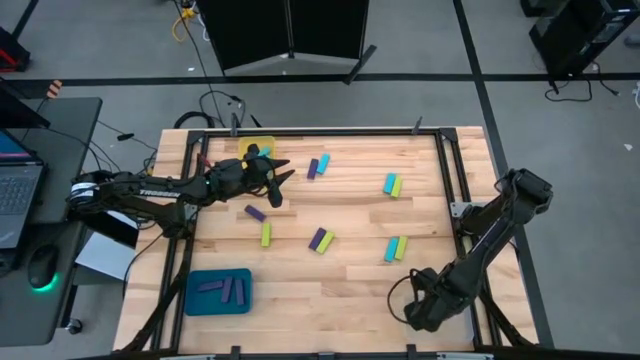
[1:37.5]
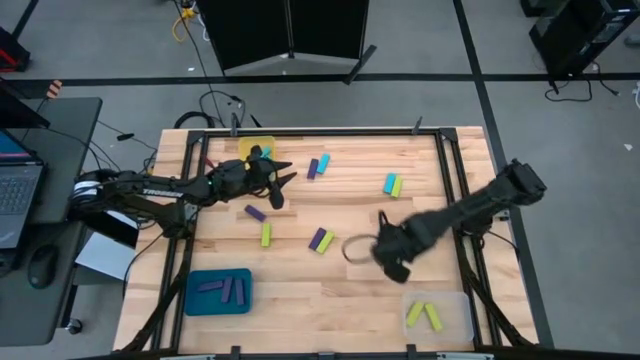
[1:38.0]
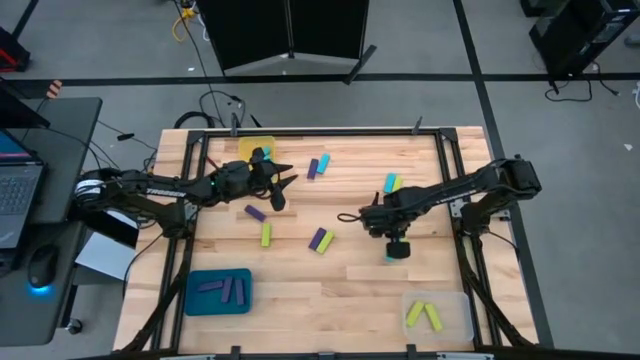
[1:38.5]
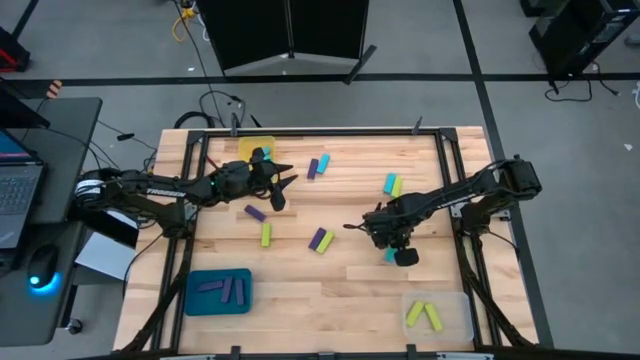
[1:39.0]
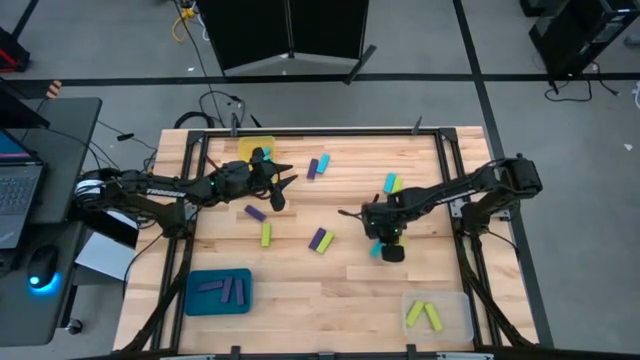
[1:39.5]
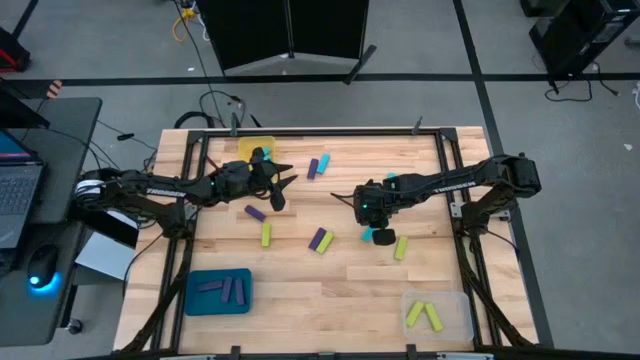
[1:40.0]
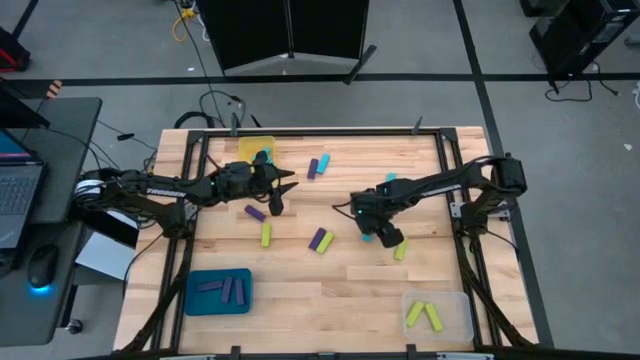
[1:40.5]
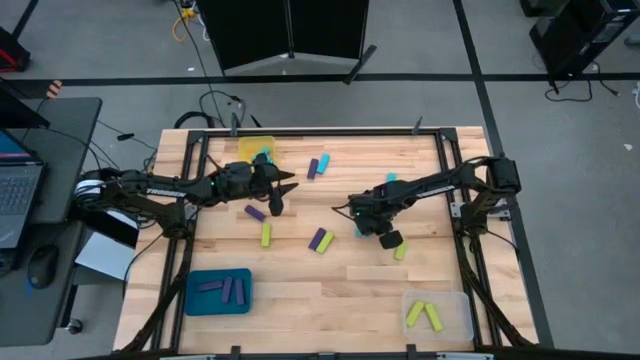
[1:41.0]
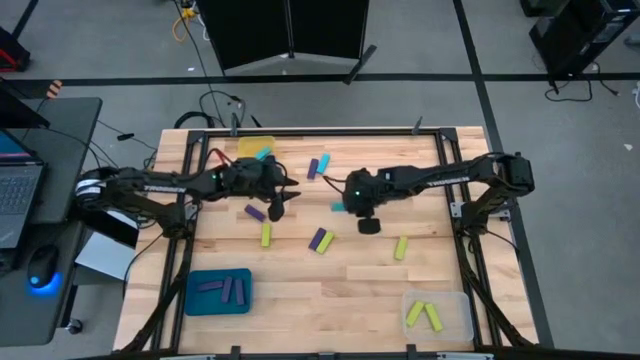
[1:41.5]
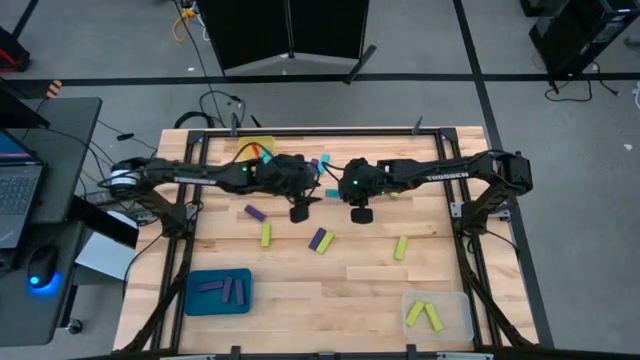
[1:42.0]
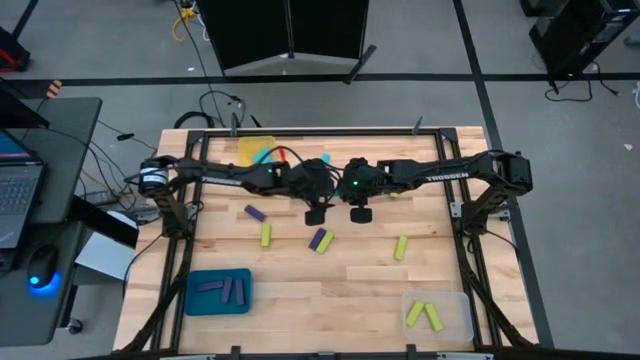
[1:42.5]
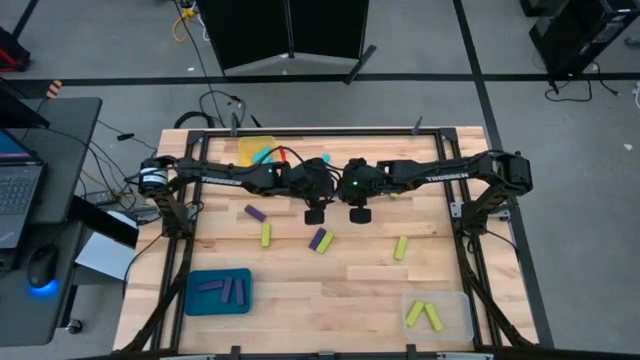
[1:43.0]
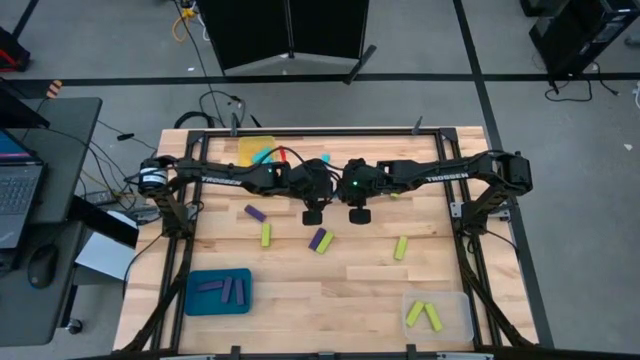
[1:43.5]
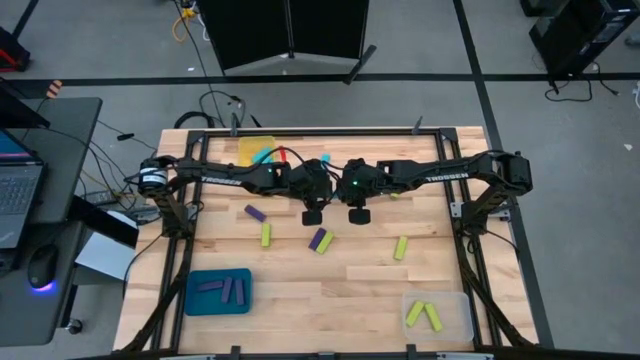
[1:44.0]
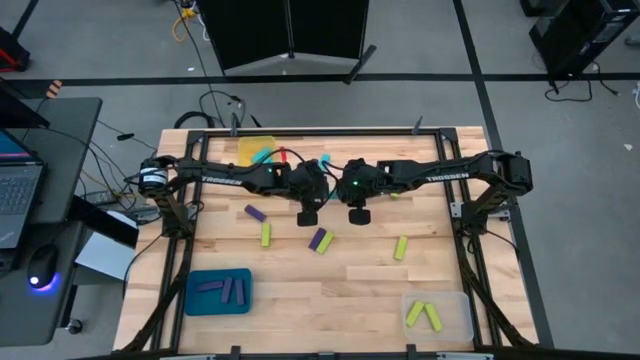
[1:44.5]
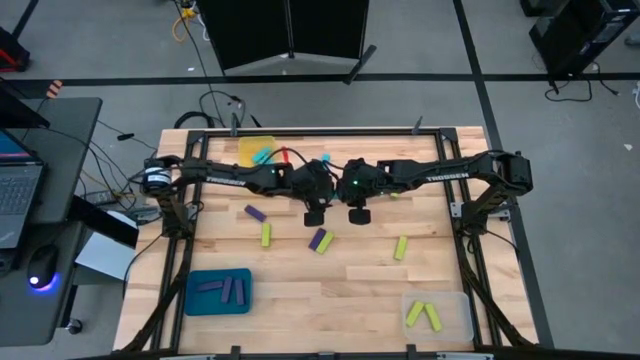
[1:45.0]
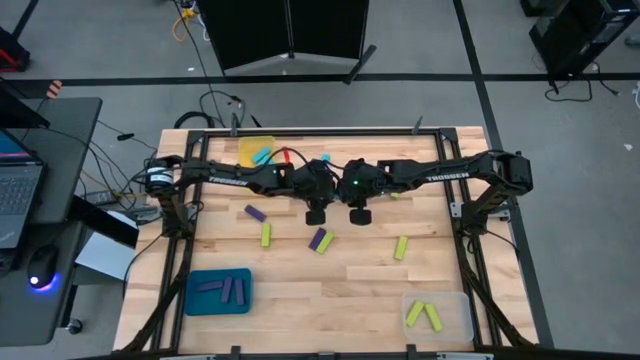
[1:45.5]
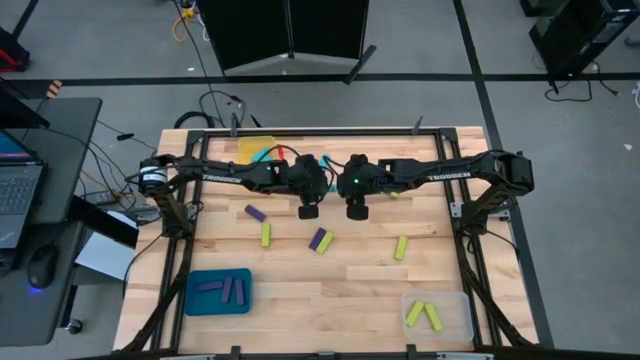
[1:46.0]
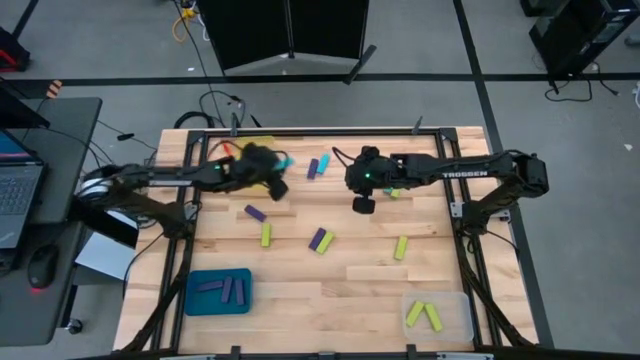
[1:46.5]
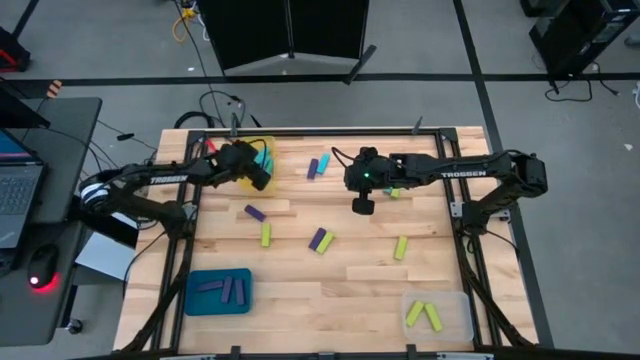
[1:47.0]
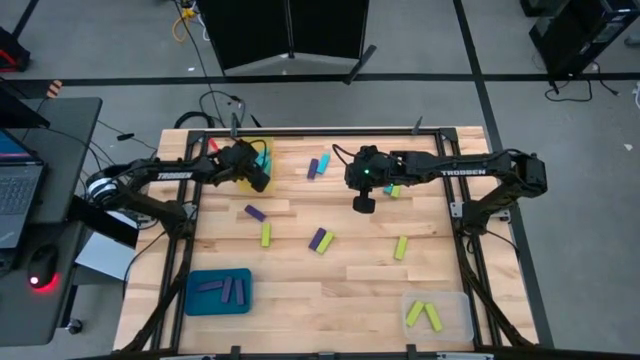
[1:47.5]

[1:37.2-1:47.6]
Task: Sort blocks
Put the bottom blue block into the yellow bin

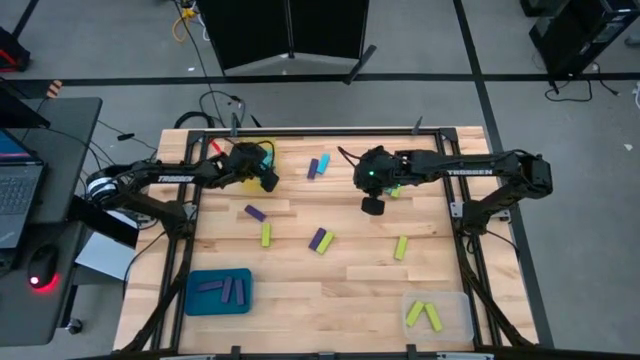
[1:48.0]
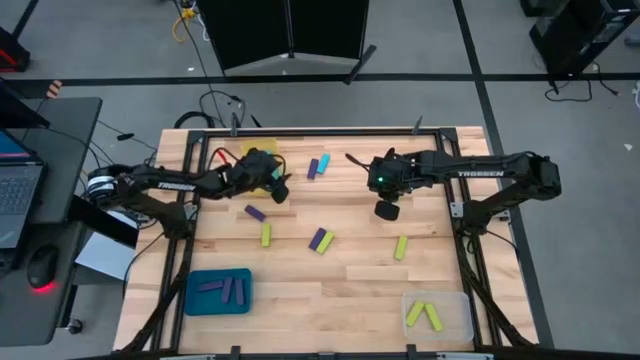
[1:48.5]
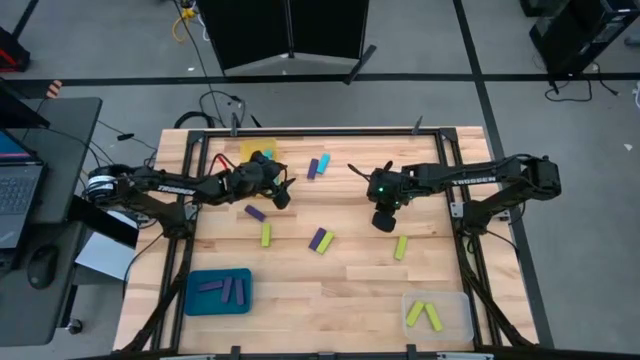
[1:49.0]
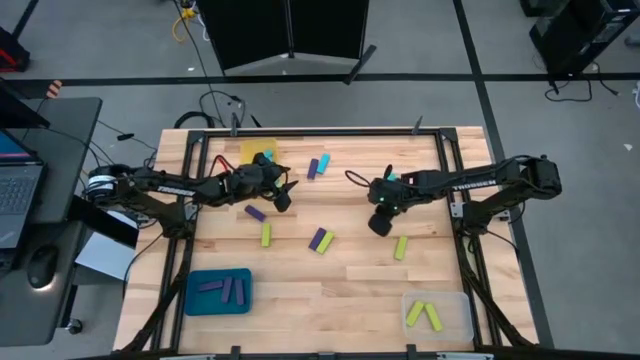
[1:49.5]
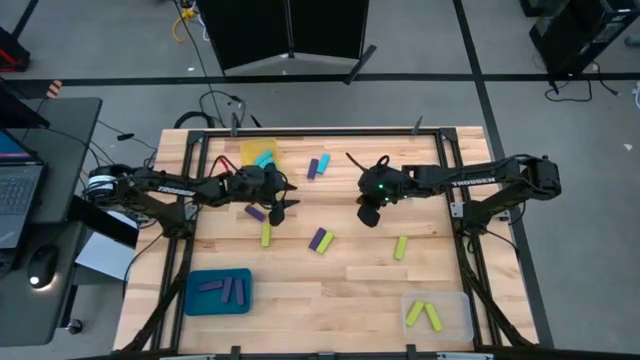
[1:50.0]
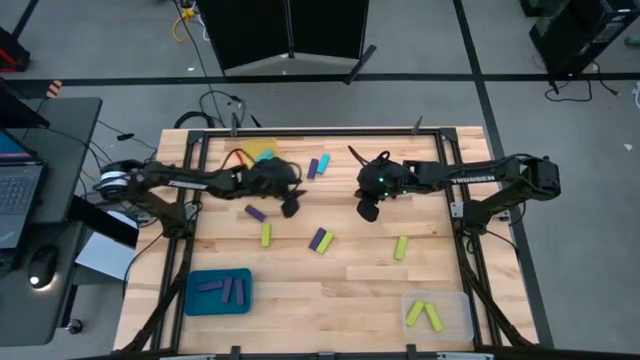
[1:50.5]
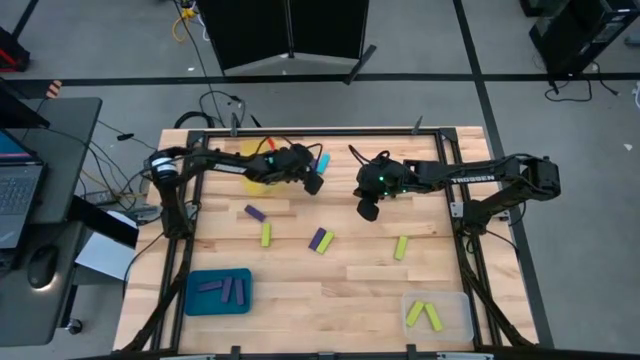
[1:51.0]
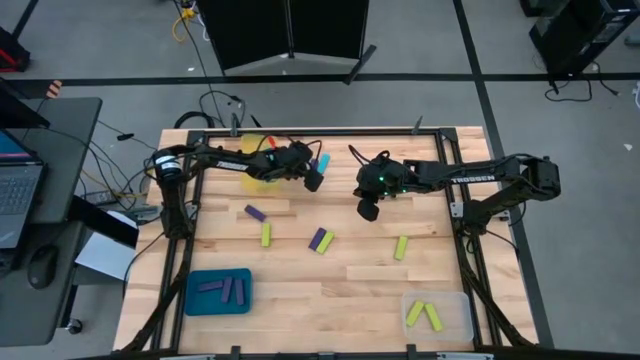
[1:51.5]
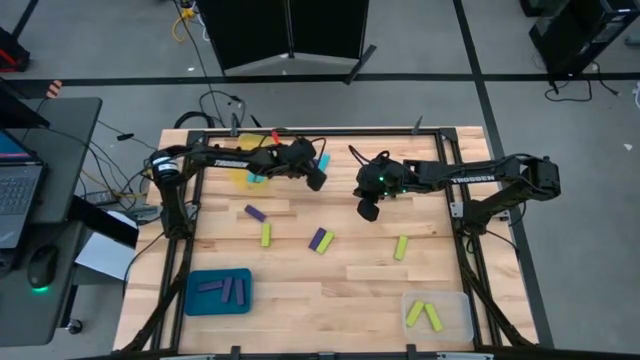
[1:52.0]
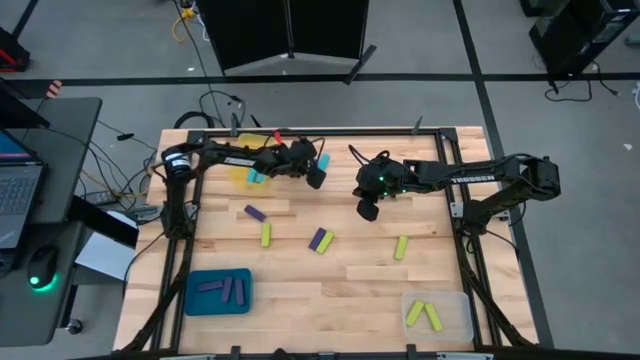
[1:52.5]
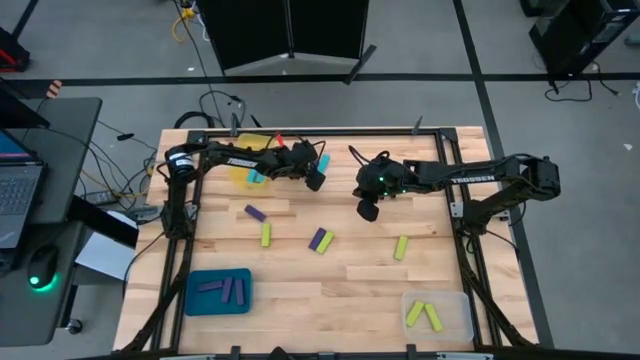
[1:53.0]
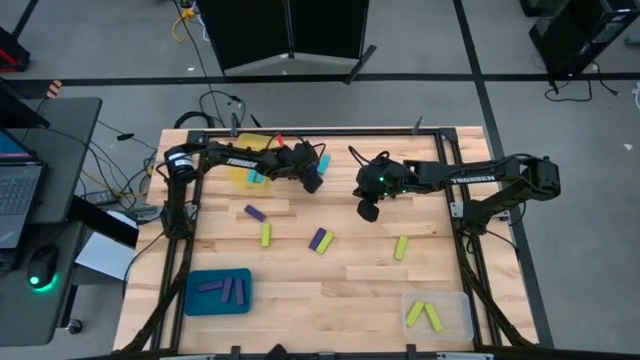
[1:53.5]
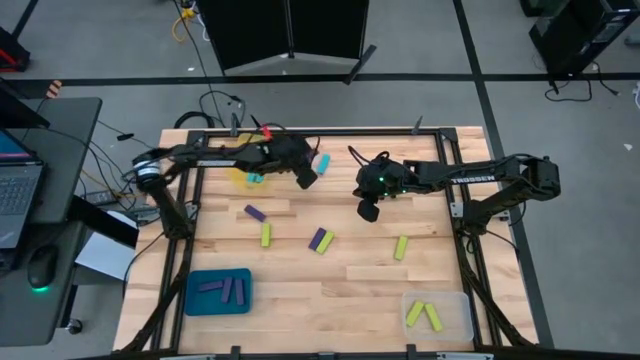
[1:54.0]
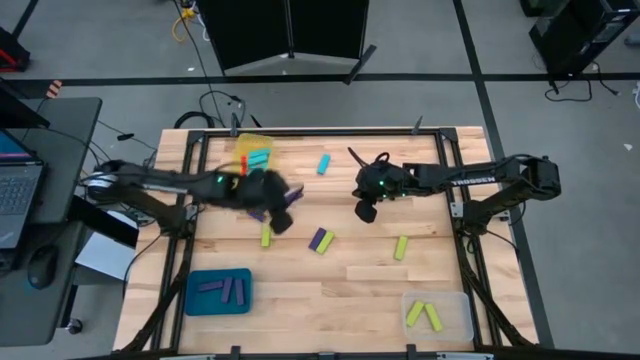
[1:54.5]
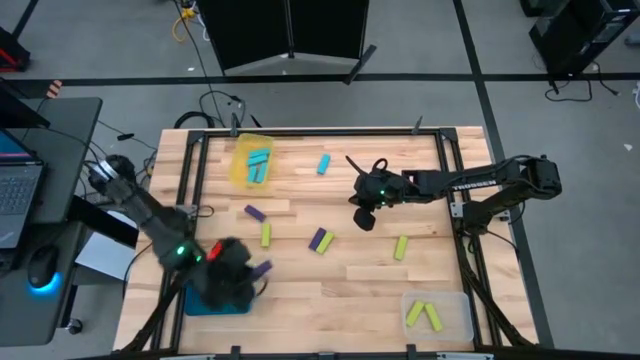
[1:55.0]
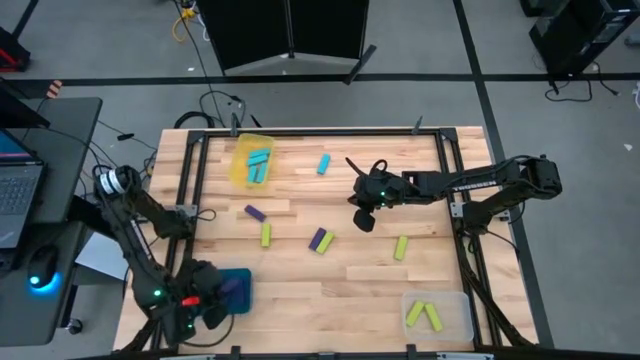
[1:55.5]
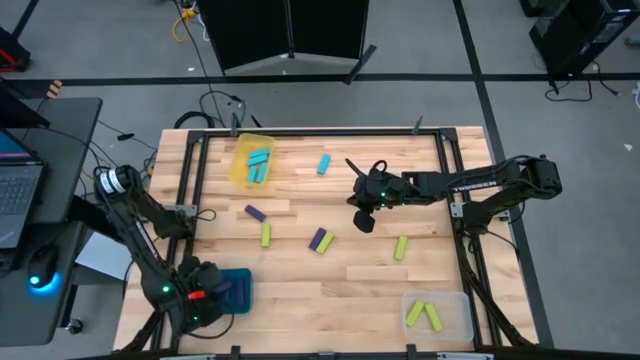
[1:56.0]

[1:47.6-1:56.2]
Put the top purple block into the blue bin

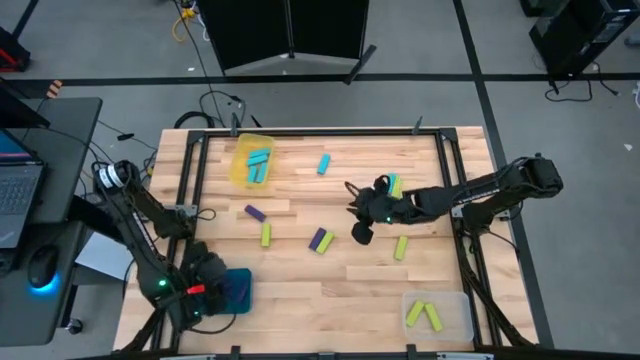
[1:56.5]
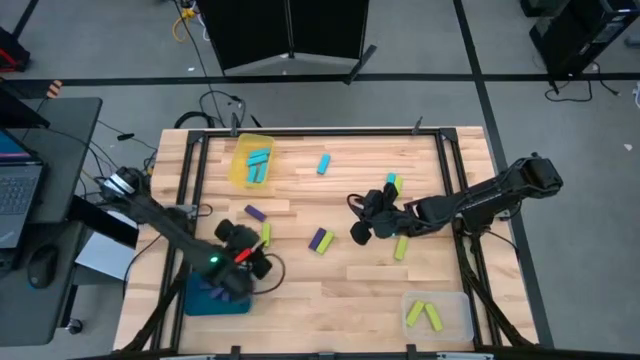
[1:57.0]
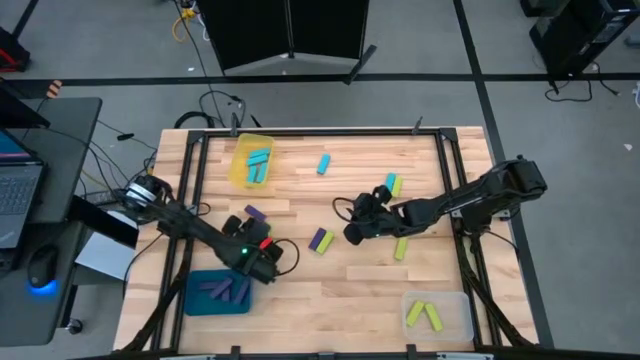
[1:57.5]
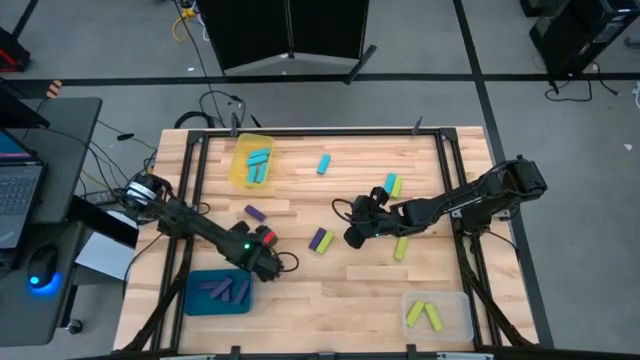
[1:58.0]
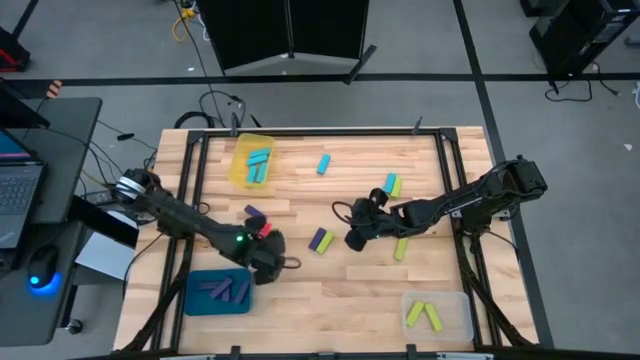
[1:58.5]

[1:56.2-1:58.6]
Put the green block into the transparent bin
